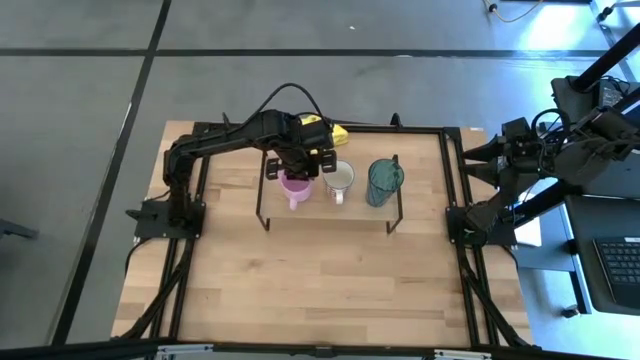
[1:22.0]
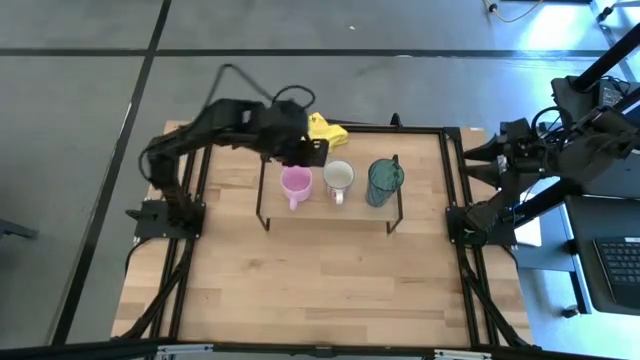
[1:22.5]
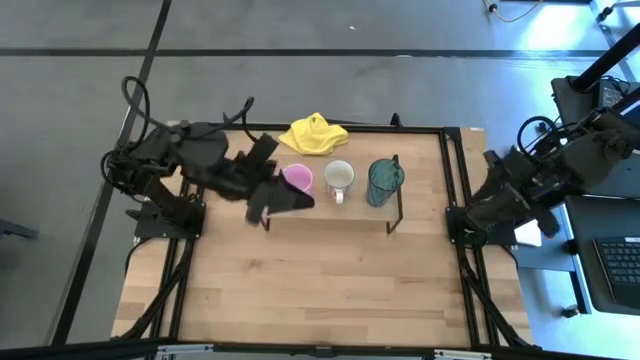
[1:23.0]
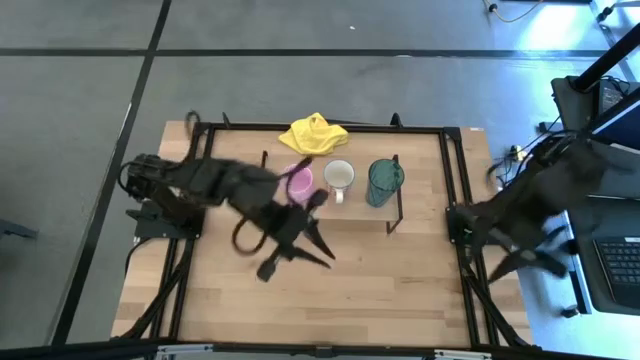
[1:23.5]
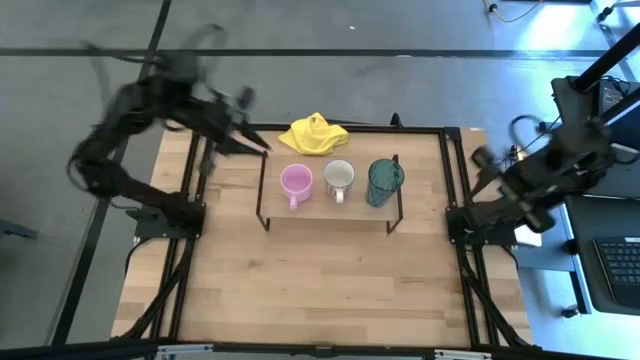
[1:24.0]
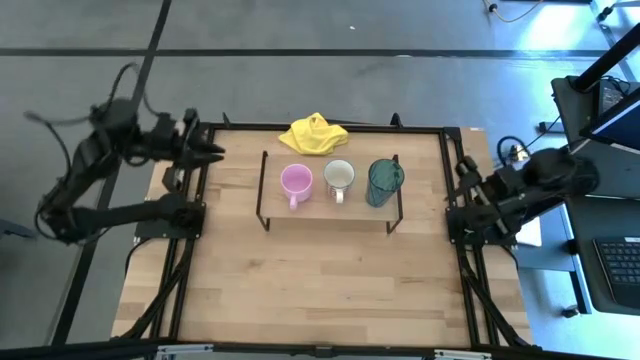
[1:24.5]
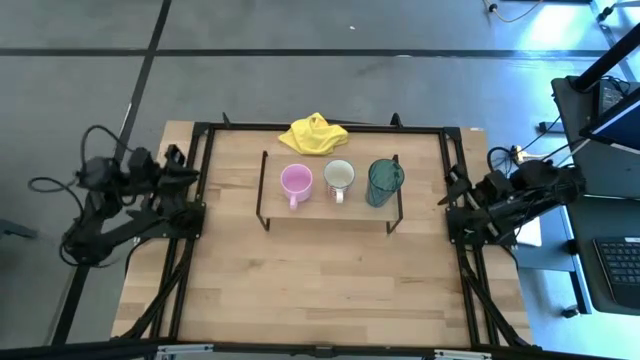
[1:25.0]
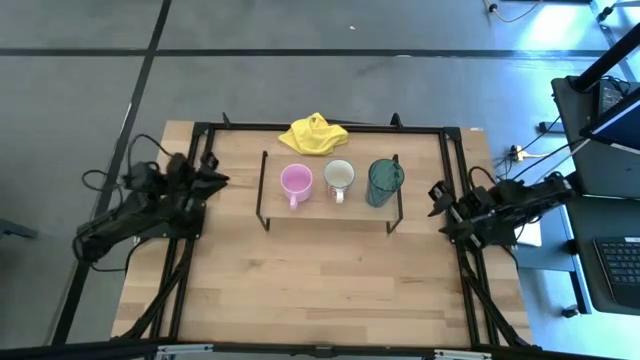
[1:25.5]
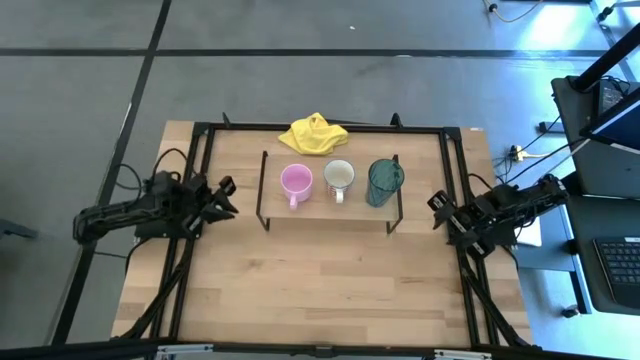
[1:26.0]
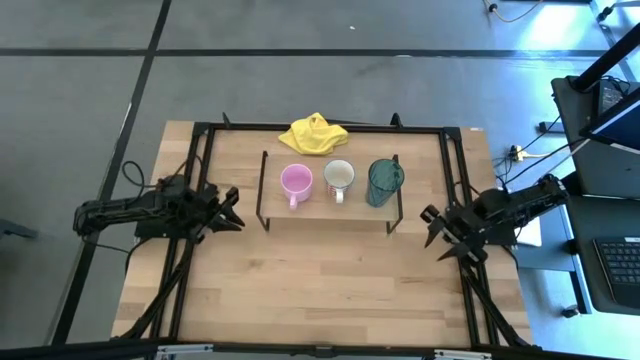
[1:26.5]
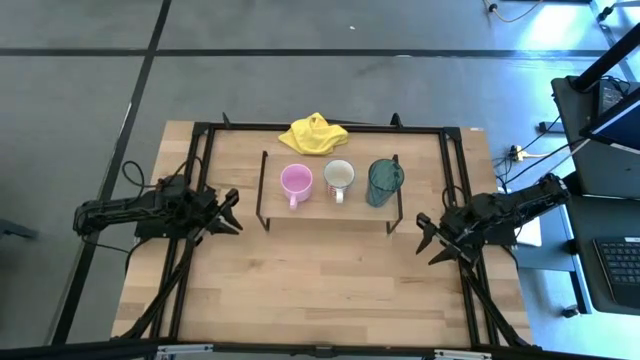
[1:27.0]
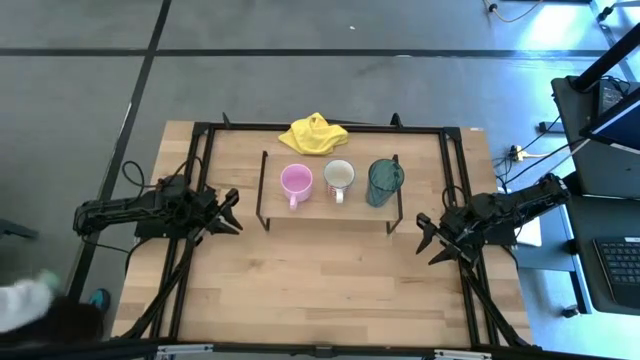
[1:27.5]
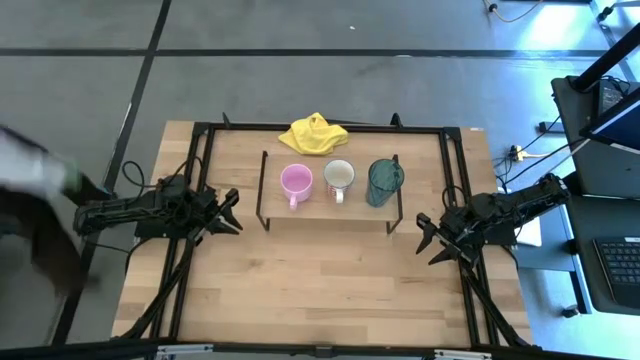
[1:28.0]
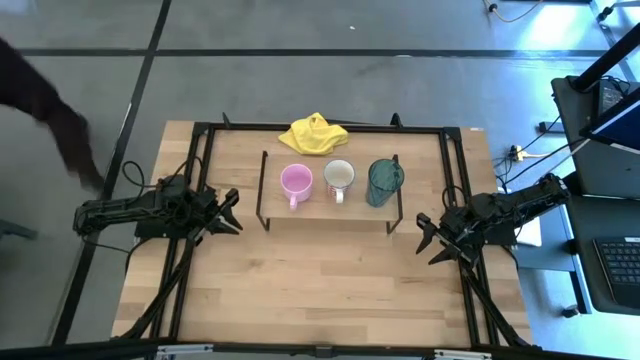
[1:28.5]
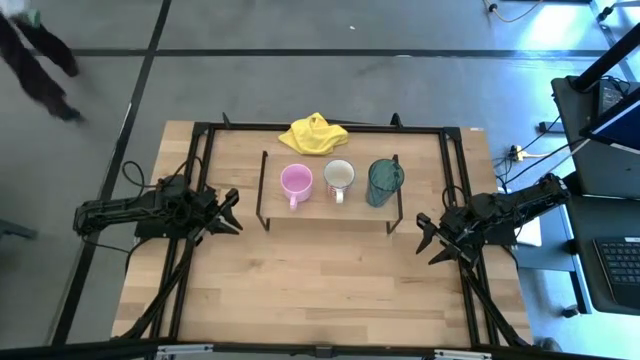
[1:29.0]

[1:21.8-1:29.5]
Task: Stack small to large cups/mugs on shelf
Return to Home Position

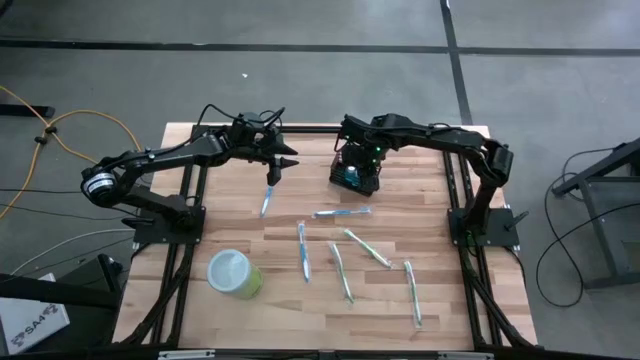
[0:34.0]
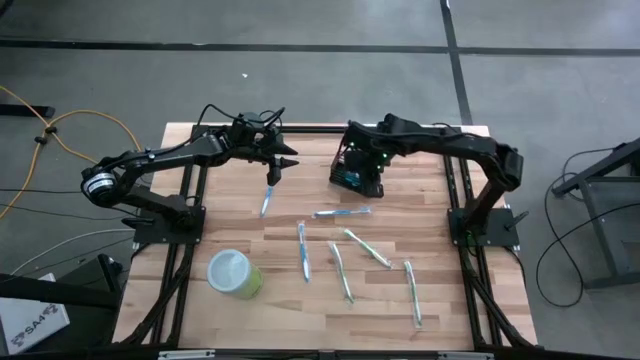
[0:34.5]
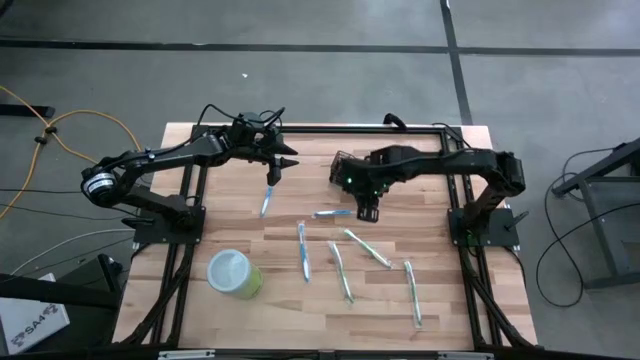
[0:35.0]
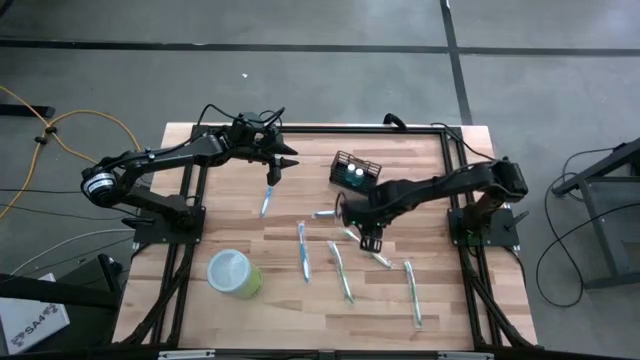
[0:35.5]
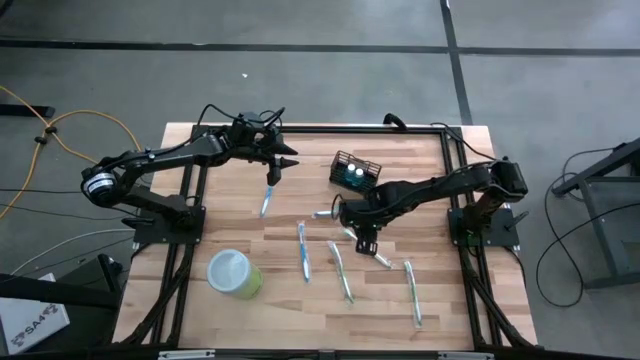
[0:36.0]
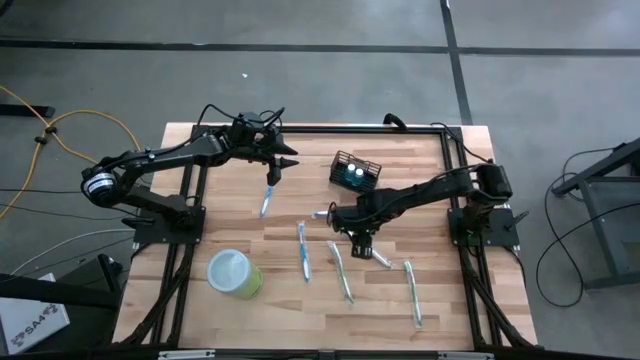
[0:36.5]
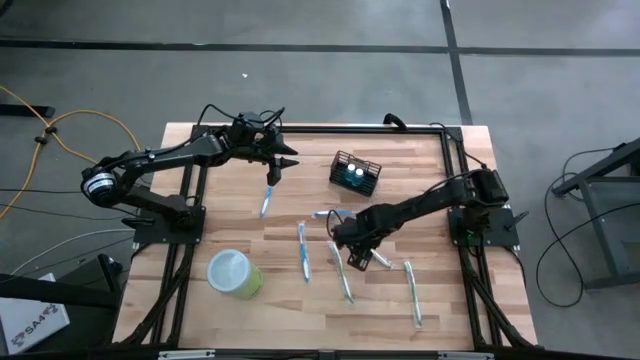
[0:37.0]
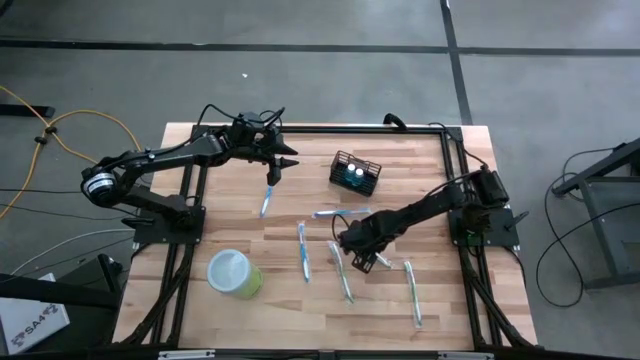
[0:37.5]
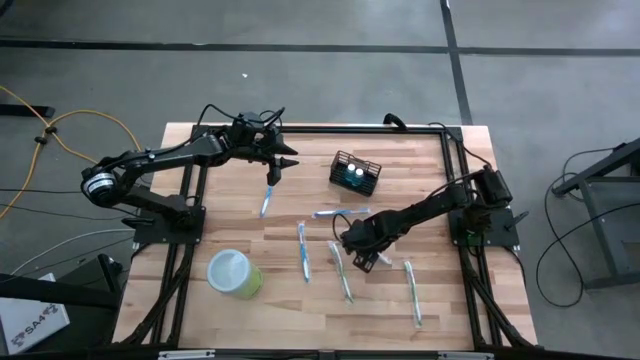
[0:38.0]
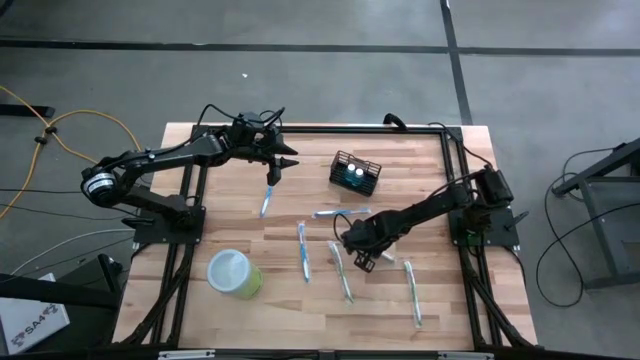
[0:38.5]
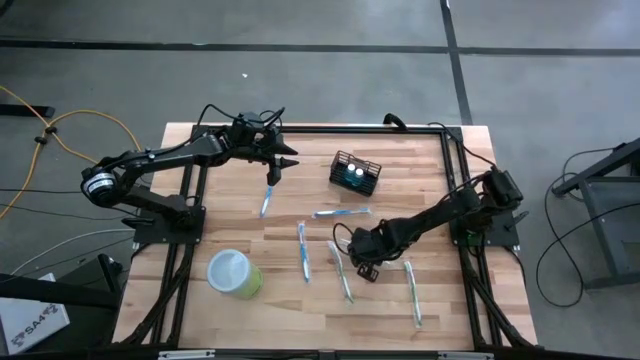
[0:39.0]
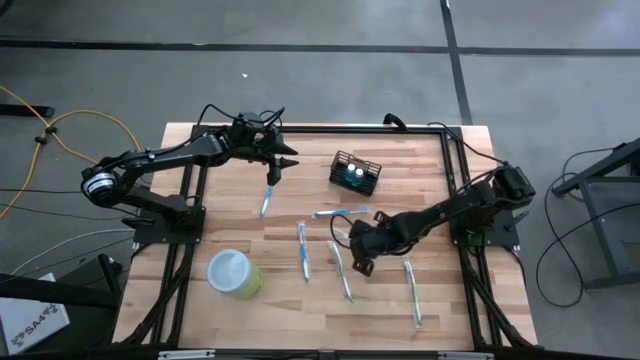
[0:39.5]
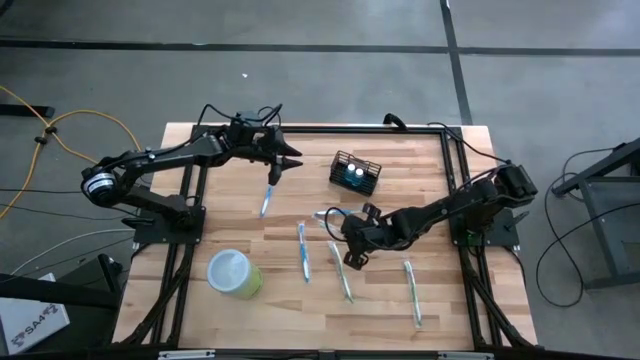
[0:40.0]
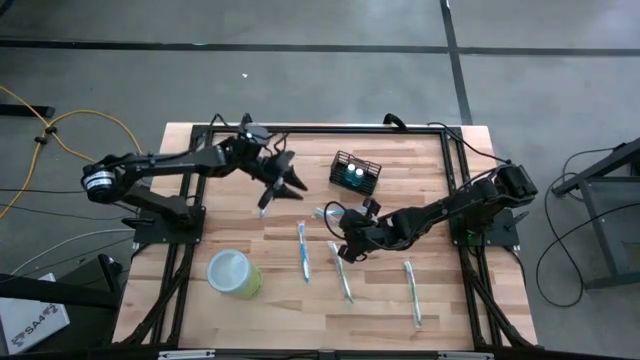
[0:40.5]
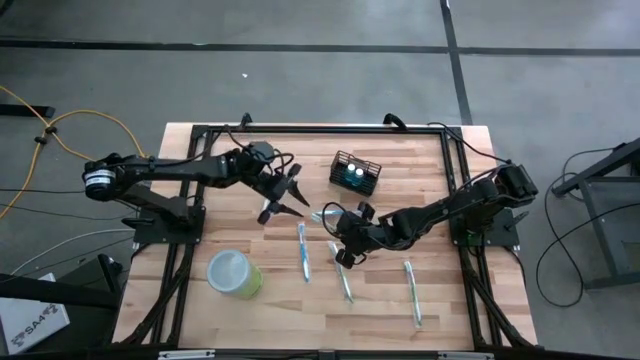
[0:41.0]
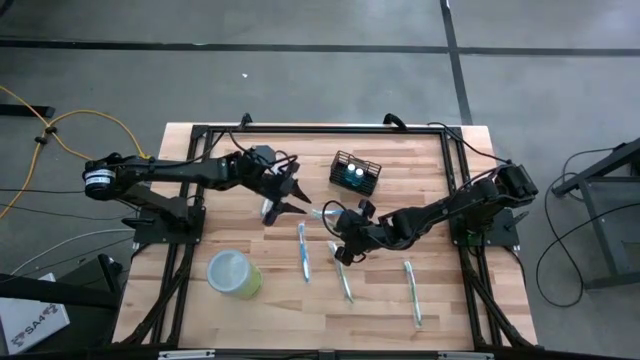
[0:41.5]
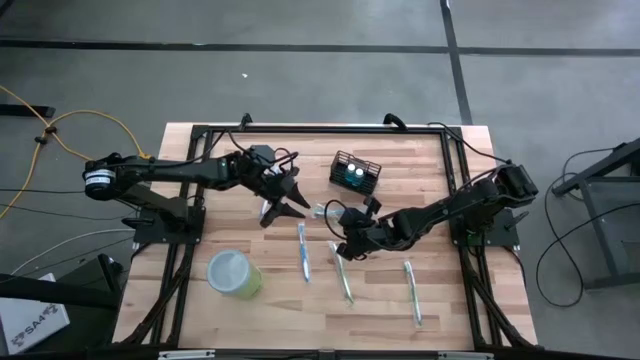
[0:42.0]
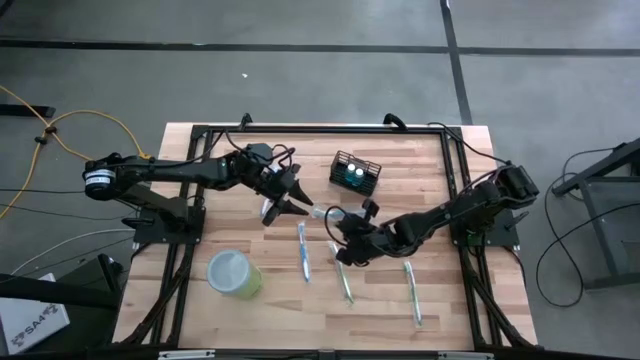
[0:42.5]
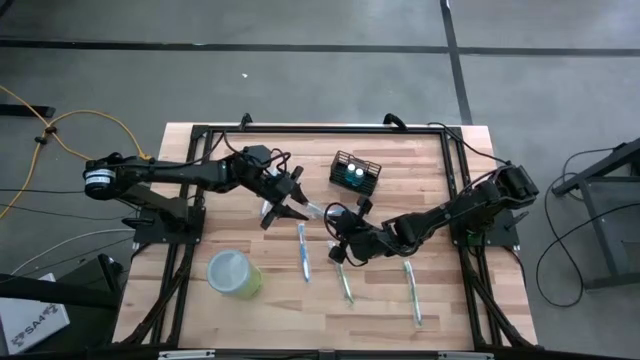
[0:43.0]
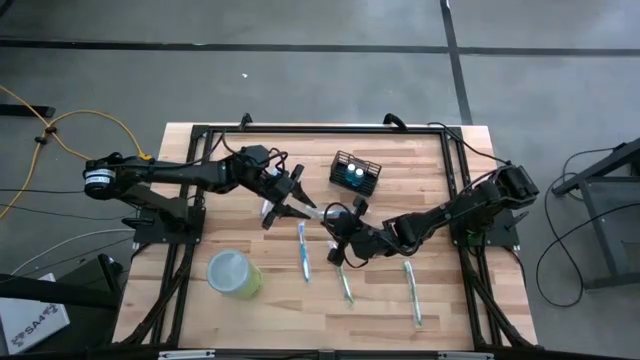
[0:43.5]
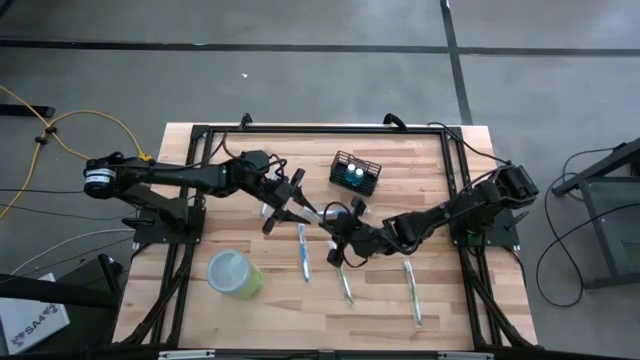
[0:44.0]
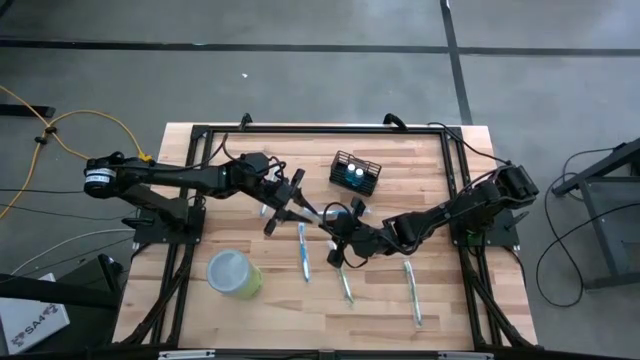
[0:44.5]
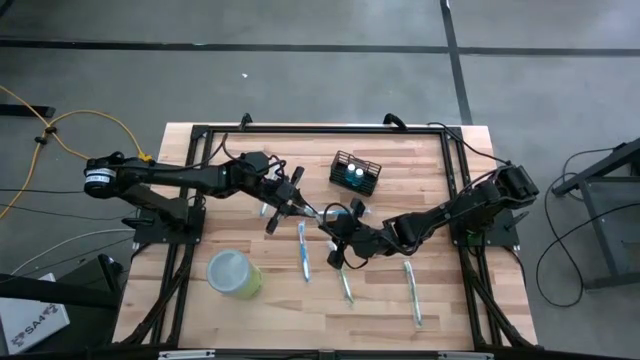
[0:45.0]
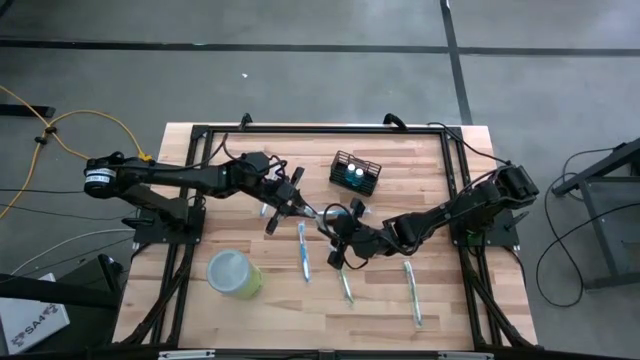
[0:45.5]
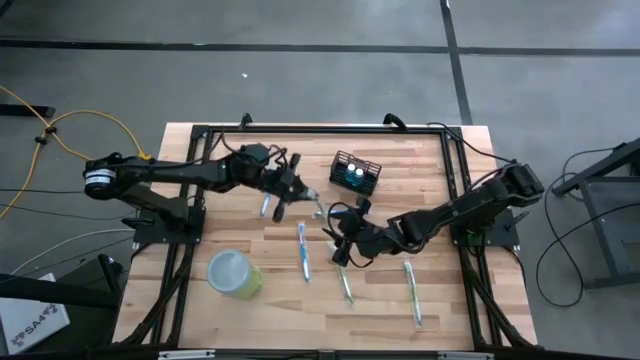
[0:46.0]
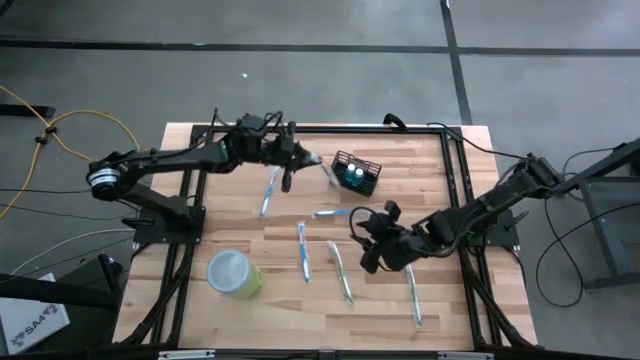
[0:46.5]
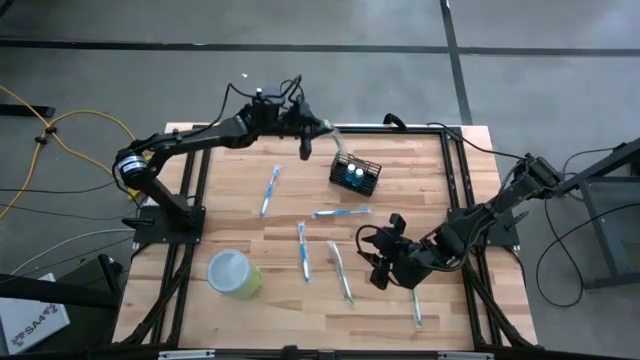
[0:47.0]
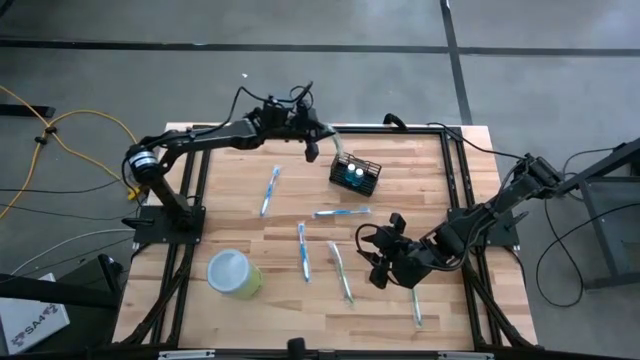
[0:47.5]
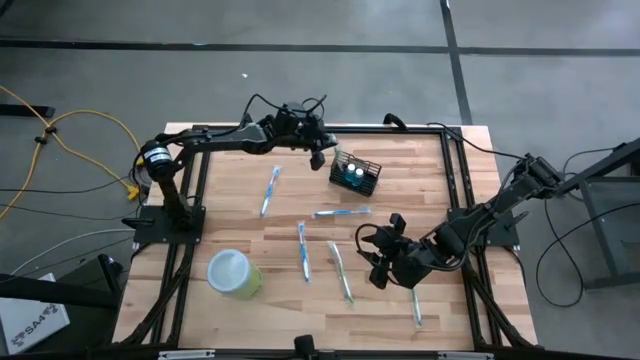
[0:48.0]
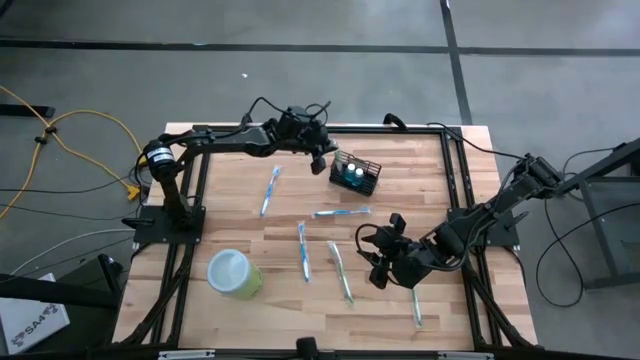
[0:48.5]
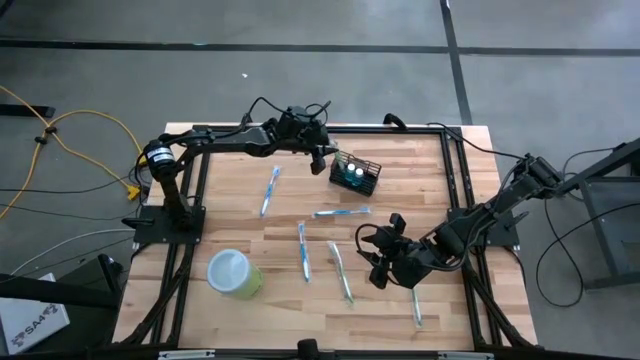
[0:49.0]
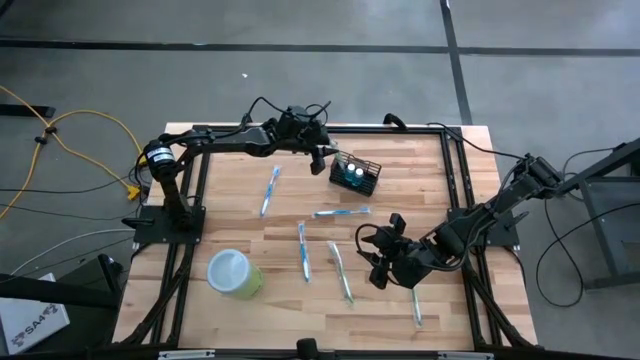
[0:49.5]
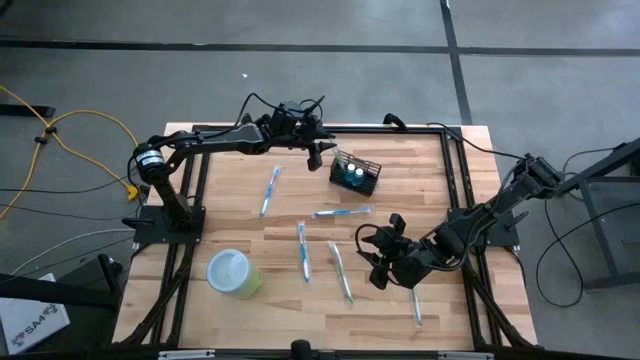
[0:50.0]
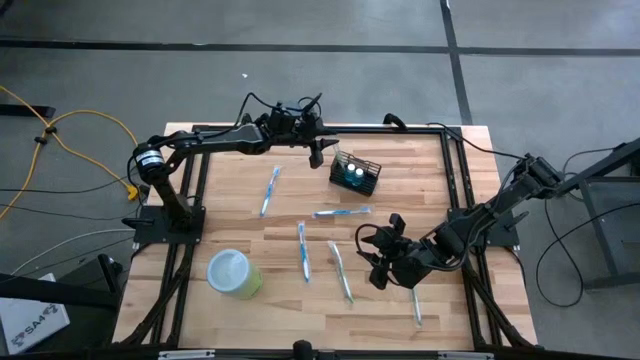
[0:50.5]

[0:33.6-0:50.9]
Task: Pick & Place toothbrushing station
Put the top green toothbrush into the left section of the black mesh organizer
